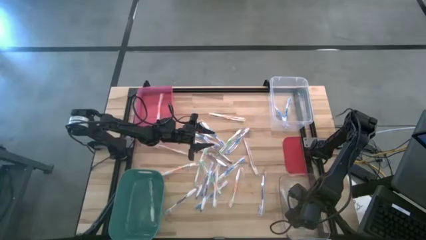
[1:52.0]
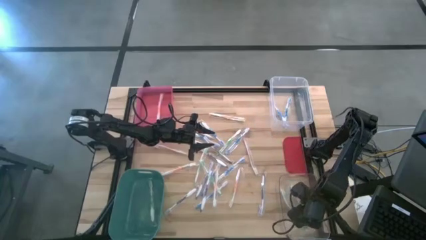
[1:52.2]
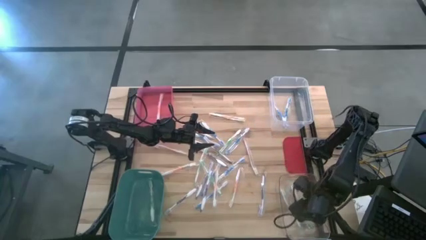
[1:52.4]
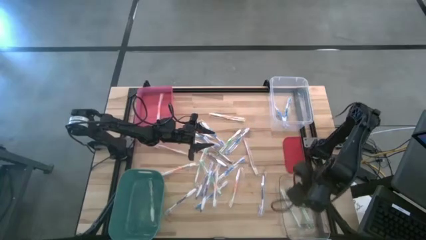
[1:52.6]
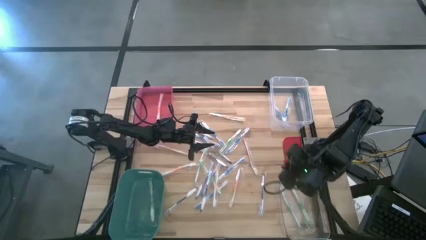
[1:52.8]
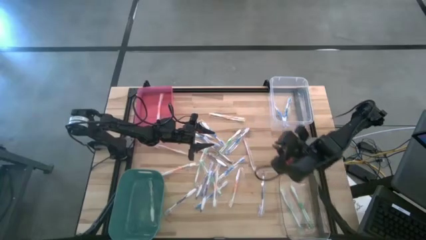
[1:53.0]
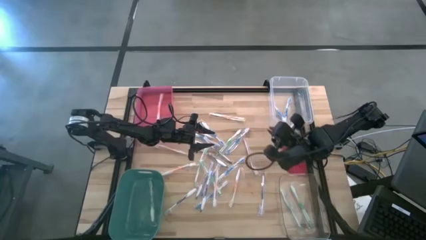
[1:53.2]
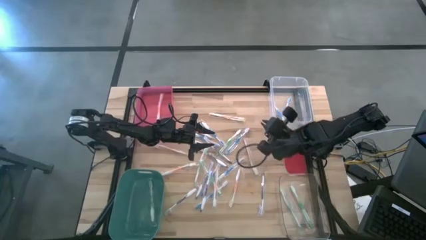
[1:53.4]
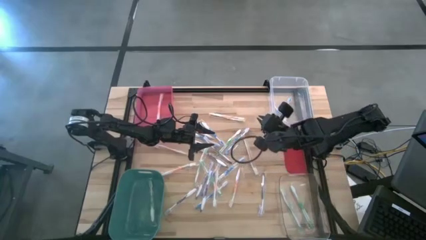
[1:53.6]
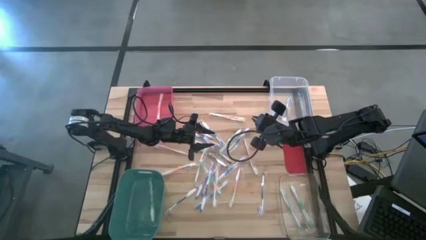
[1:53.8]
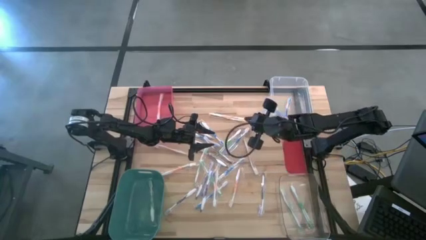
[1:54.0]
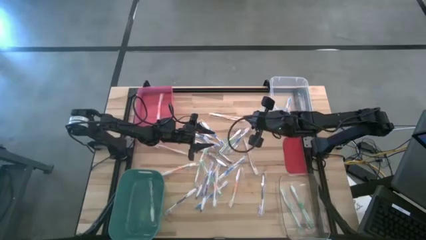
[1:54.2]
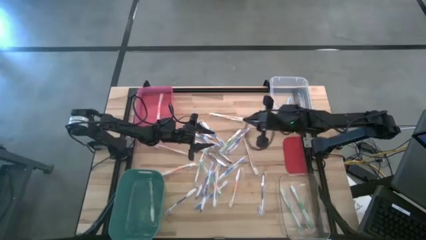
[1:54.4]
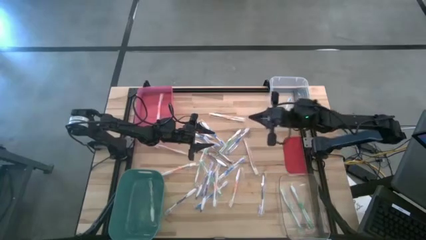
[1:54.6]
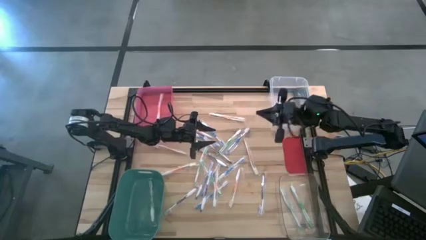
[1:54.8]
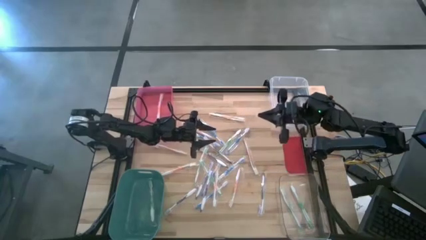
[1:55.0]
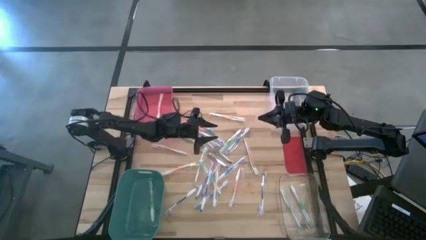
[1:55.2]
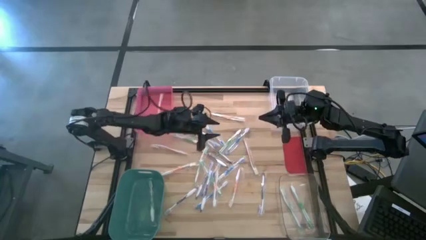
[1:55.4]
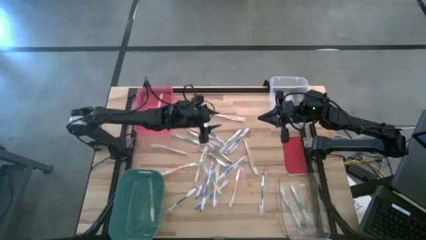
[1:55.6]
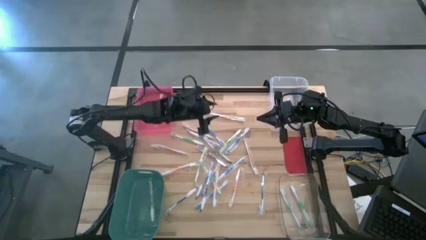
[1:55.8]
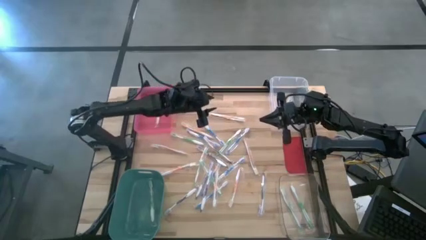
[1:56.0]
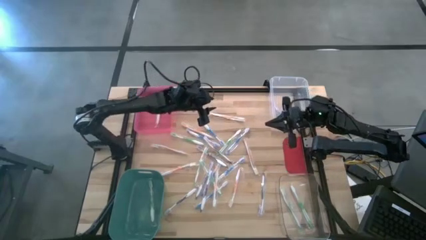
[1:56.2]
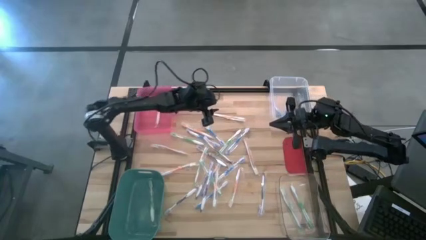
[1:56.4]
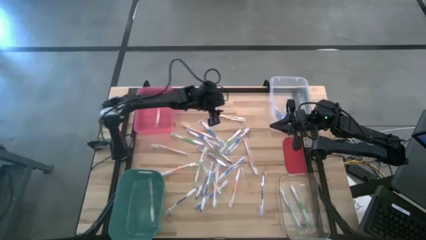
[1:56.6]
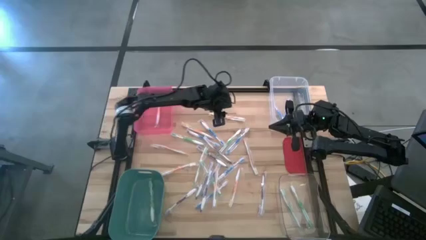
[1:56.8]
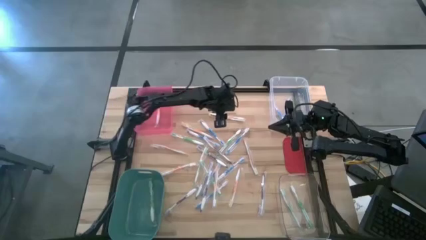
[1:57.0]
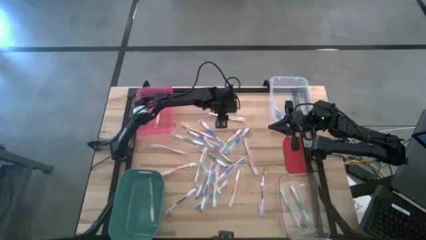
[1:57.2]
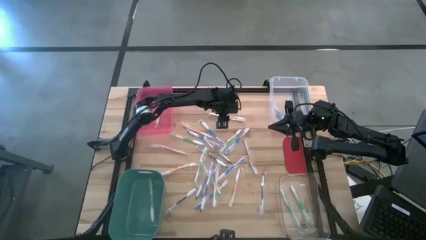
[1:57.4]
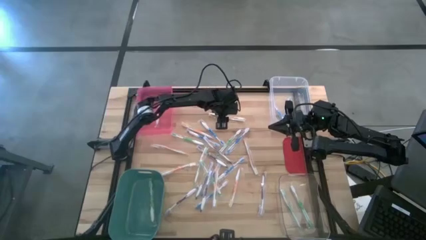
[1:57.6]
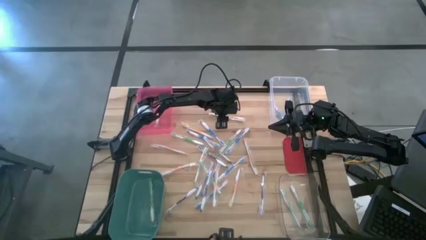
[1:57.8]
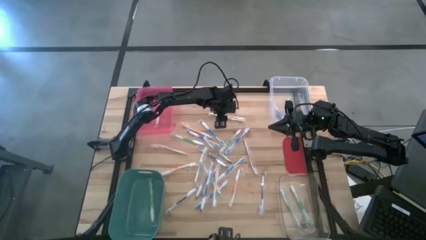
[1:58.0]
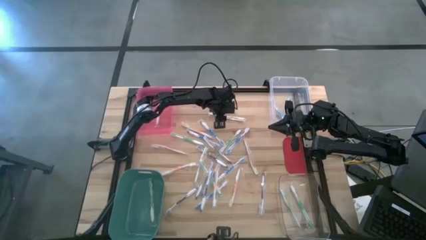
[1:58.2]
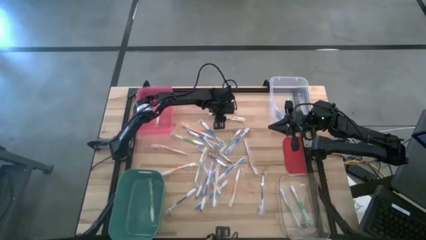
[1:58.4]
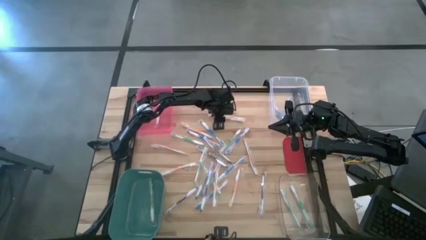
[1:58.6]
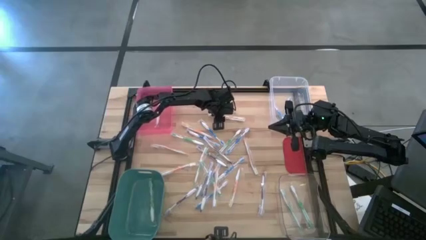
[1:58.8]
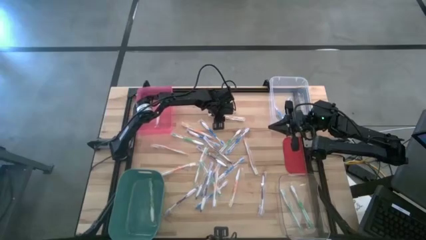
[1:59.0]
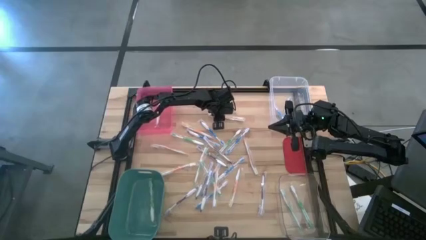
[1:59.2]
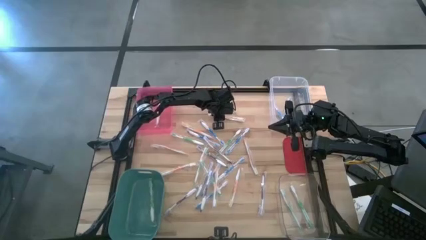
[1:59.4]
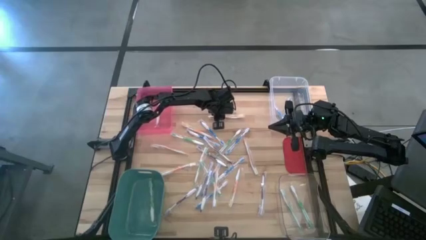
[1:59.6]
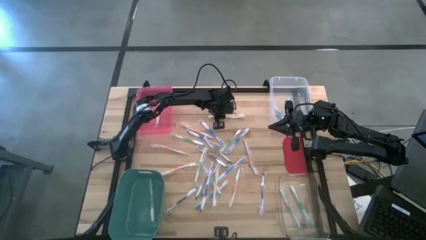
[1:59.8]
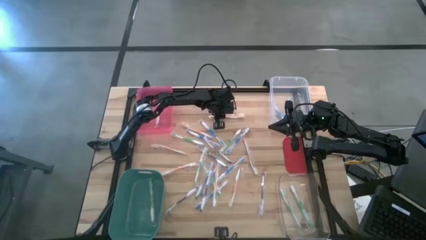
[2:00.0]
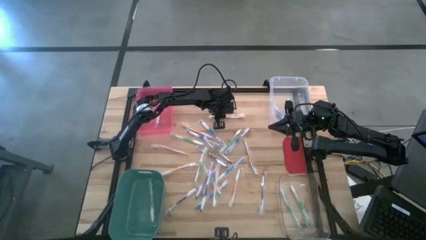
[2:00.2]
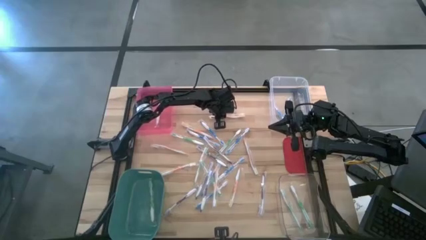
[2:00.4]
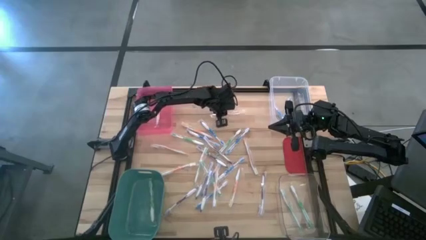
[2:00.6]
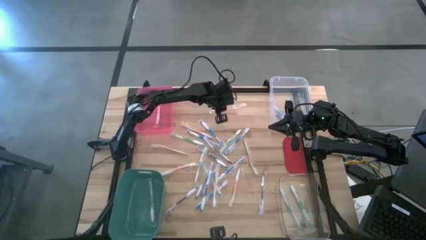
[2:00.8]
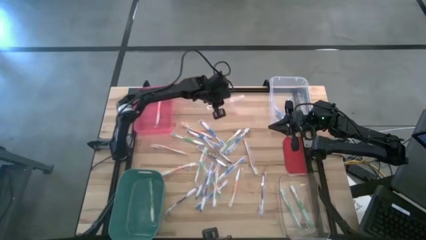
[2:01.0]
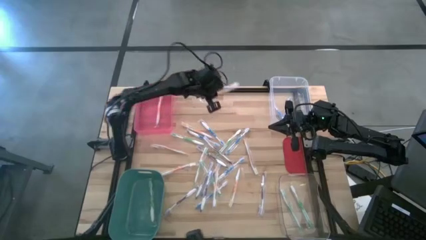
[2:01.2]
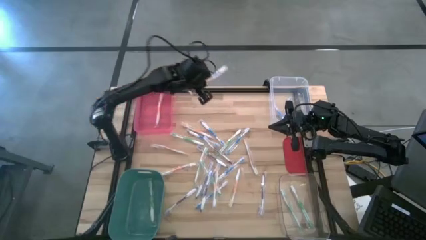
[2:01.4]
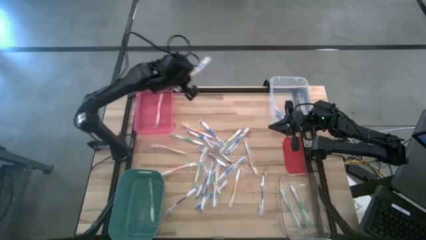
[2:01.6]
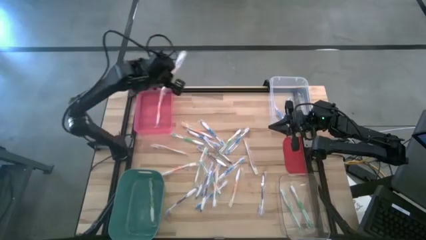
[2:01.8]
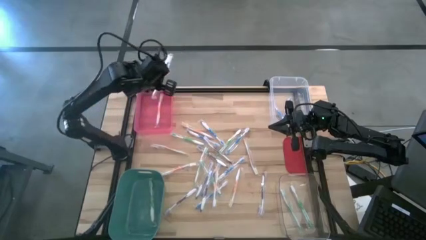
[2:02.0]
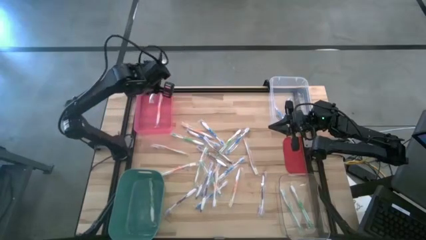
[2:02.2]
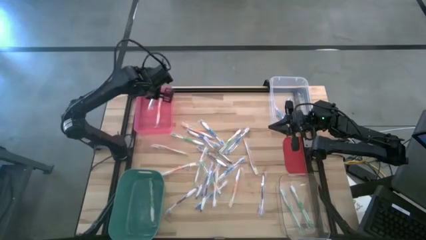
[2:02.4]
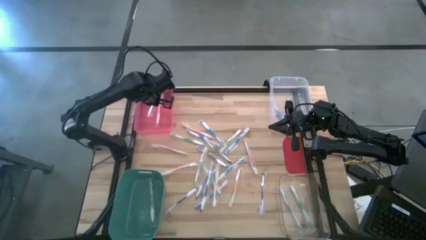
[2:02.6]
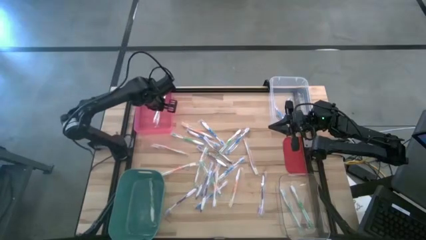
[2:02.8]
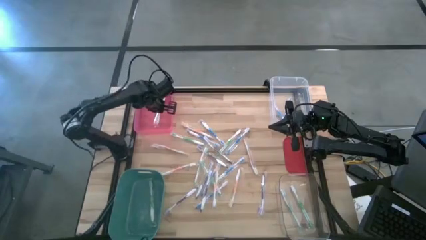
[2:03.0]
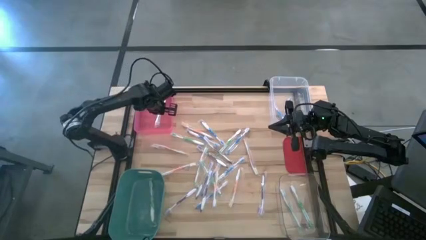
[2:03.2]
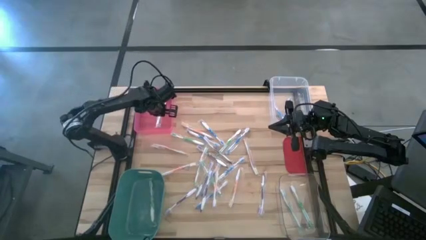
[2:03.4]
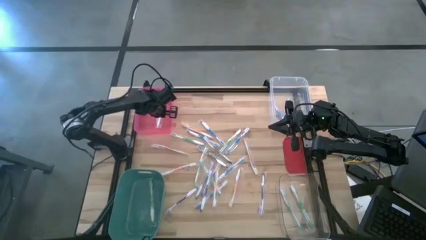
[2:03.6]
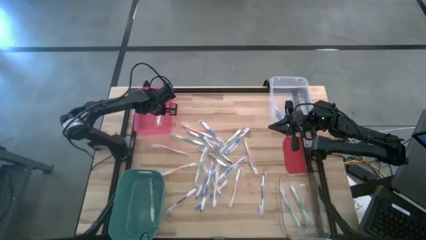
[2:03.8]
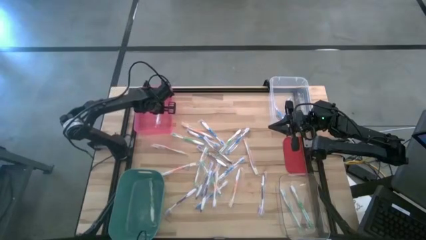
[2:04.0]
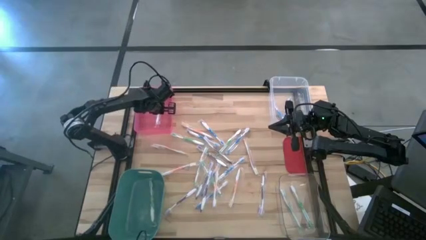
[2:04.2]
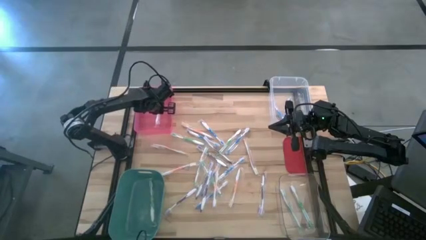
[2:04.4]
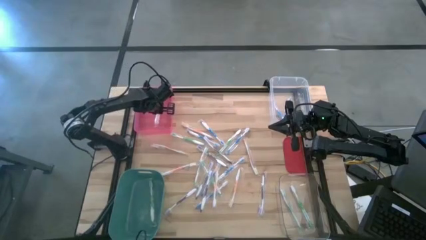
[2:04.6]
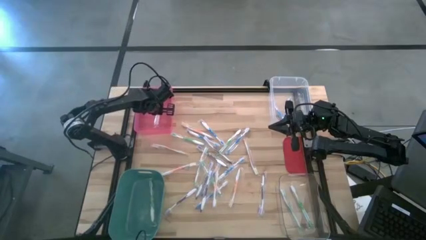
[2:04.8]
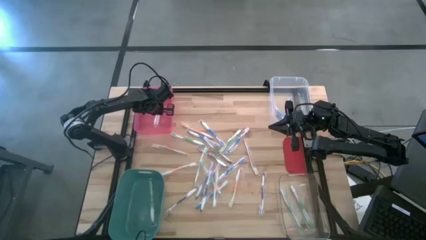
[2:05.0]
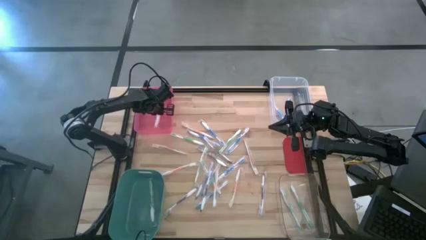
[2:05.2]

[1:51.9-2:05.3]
Task: Pick & Place Toothbrushes
Put the orange toothbrush into the pink bin

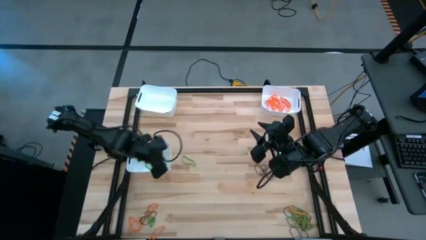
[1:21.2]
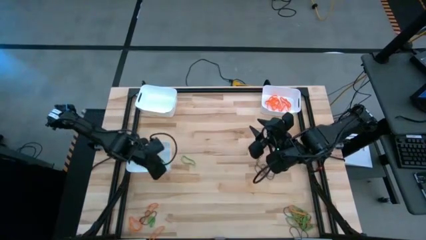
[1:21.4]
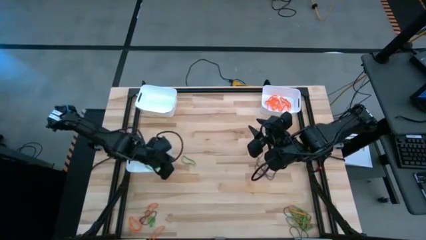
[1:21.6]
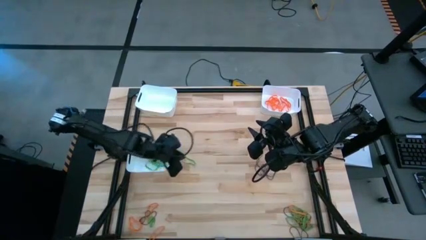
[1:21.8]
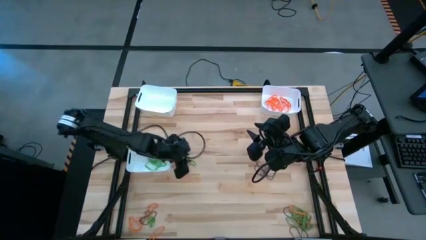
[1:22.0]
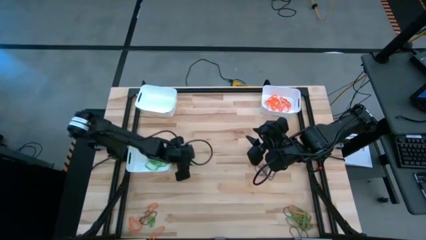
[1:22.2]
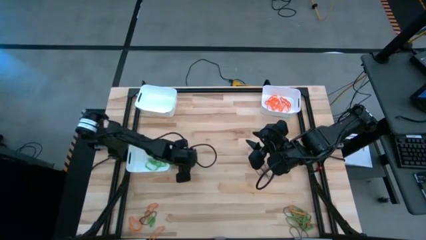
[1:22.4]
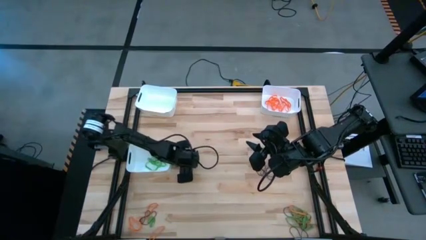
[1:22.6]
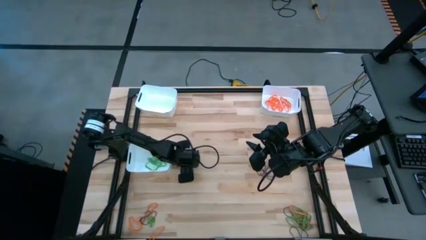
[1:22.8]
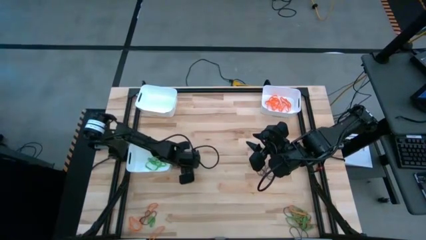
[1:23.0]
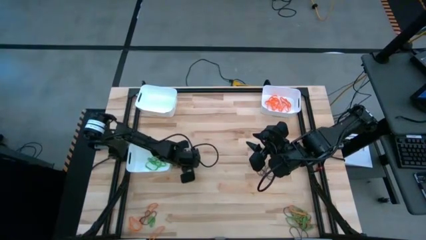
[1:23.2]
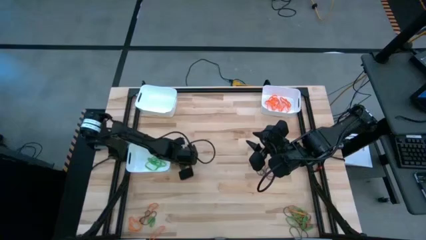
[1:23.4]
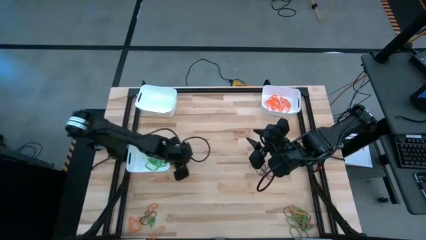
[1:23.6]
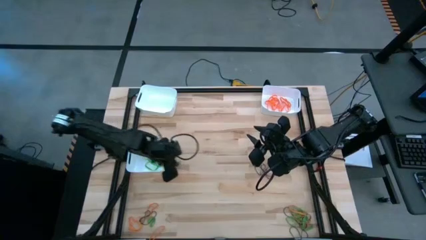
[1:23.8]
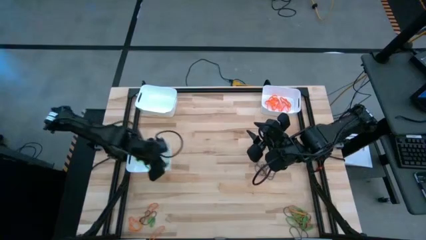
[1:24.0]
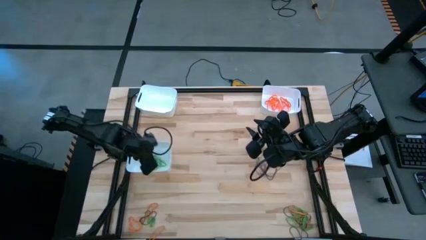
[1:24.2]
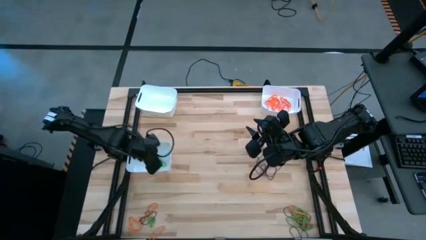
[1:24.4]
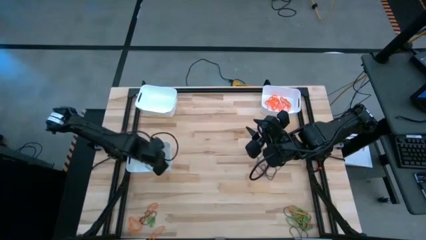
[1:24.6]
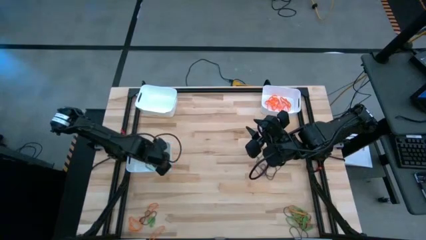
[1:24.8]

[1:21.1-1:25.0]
Task: Sort rubber bands into baskets
Put the green rubber band into the bottom white bin
